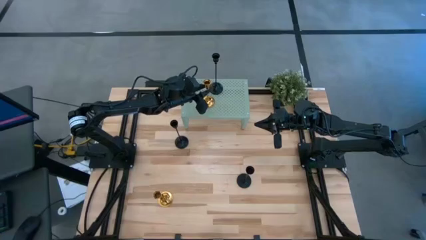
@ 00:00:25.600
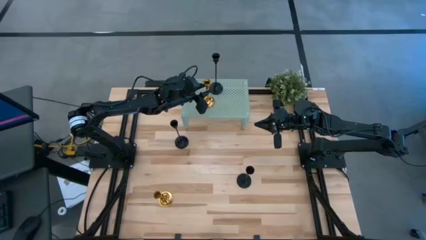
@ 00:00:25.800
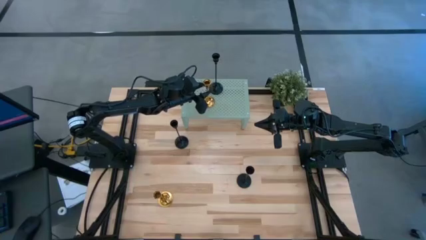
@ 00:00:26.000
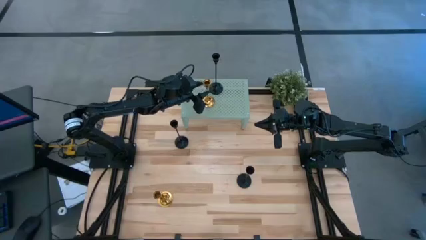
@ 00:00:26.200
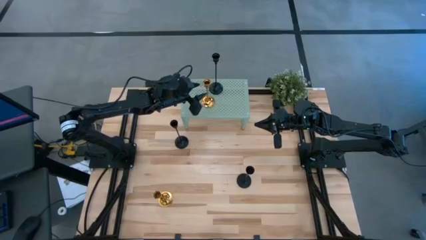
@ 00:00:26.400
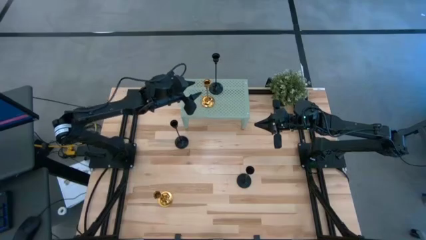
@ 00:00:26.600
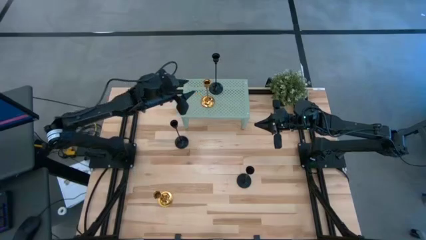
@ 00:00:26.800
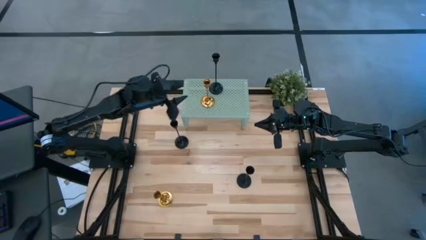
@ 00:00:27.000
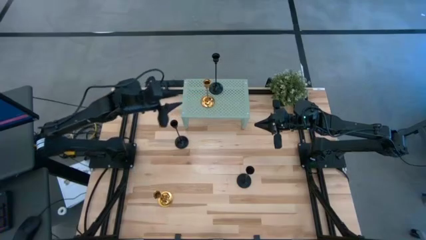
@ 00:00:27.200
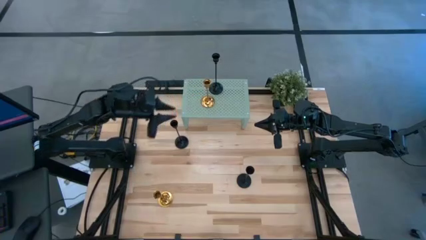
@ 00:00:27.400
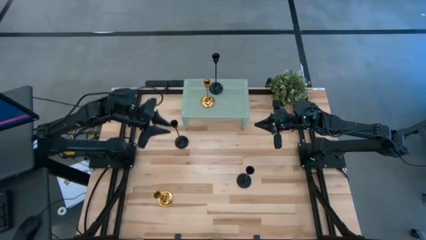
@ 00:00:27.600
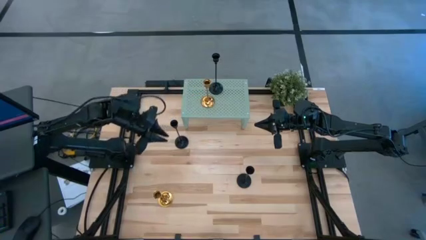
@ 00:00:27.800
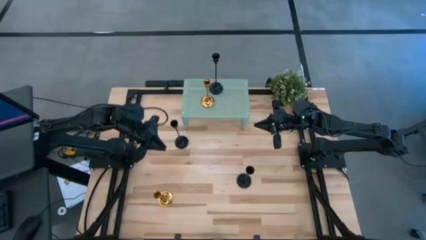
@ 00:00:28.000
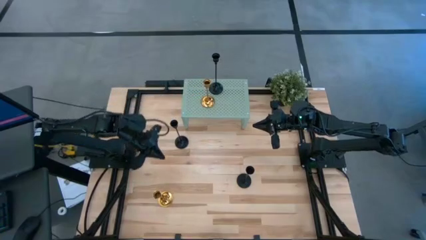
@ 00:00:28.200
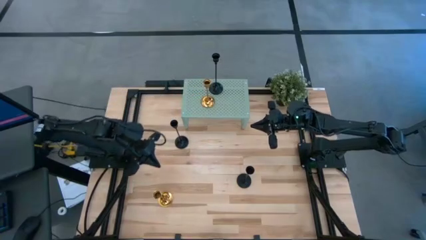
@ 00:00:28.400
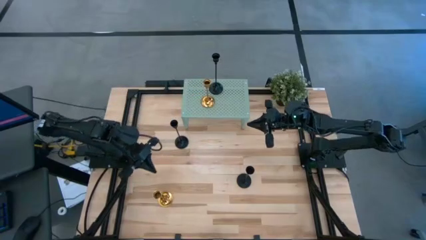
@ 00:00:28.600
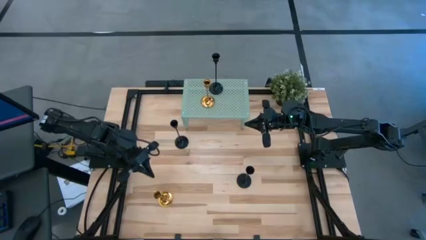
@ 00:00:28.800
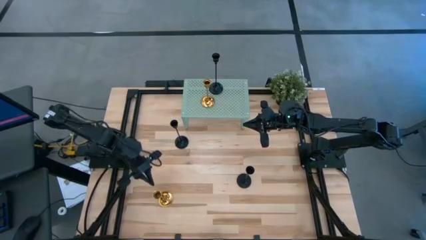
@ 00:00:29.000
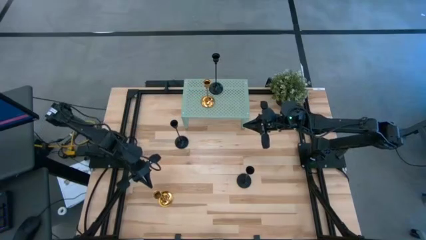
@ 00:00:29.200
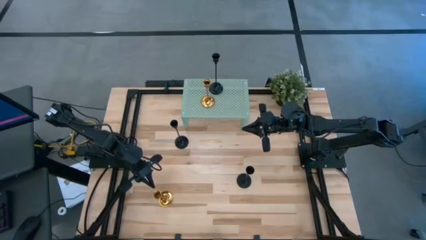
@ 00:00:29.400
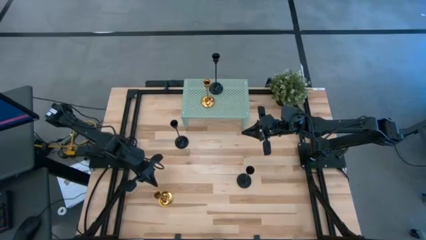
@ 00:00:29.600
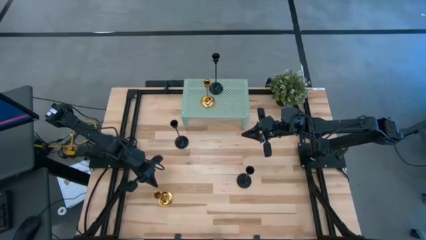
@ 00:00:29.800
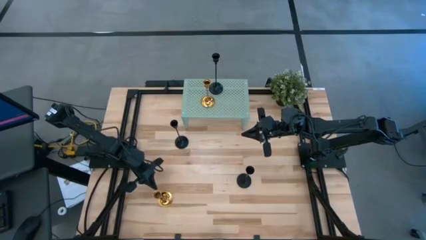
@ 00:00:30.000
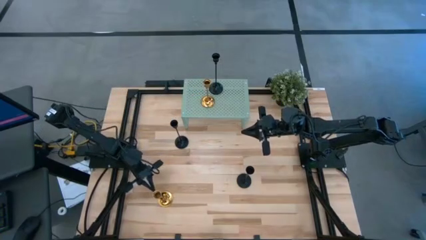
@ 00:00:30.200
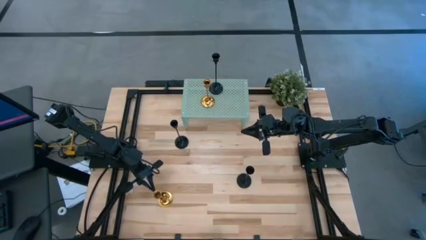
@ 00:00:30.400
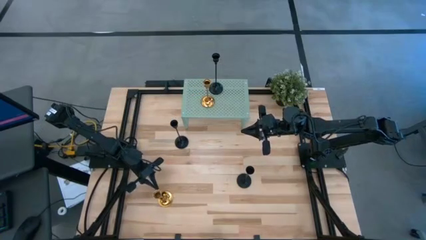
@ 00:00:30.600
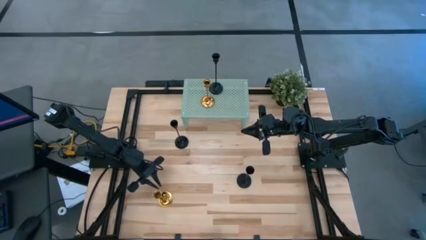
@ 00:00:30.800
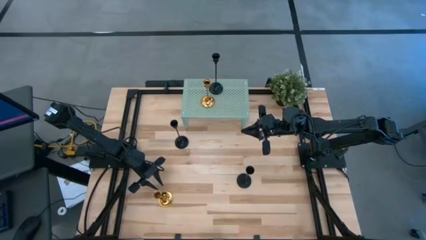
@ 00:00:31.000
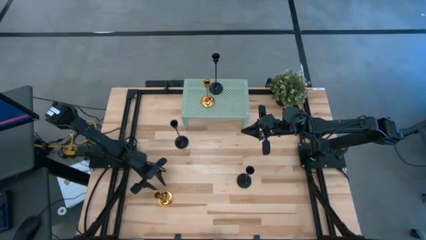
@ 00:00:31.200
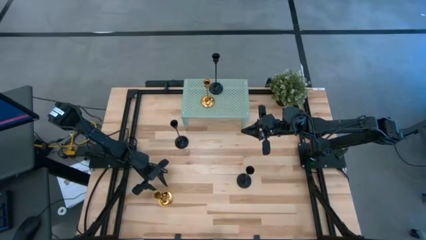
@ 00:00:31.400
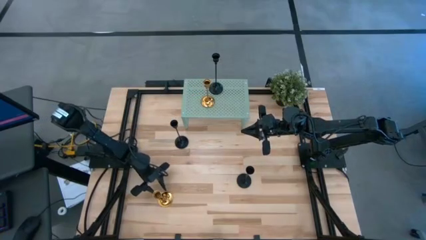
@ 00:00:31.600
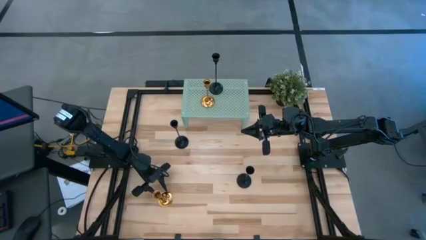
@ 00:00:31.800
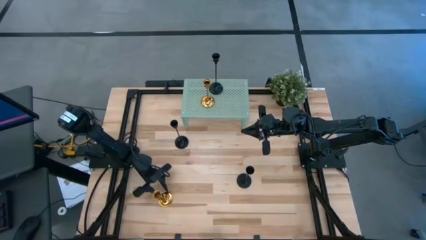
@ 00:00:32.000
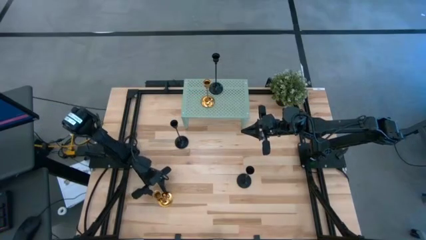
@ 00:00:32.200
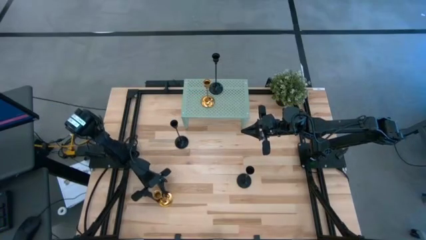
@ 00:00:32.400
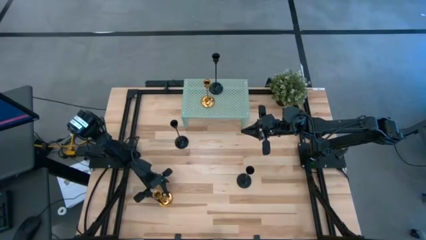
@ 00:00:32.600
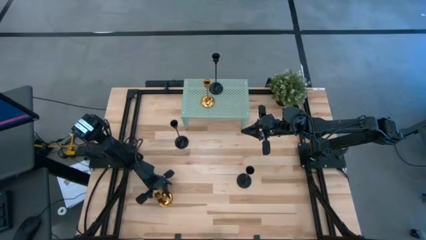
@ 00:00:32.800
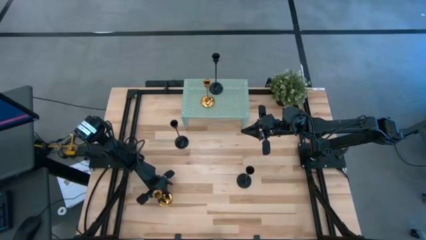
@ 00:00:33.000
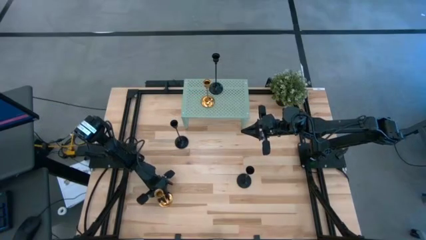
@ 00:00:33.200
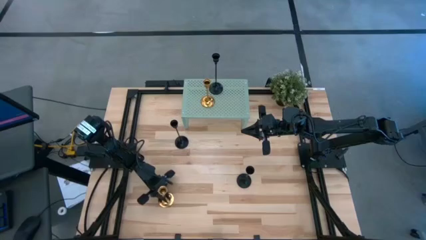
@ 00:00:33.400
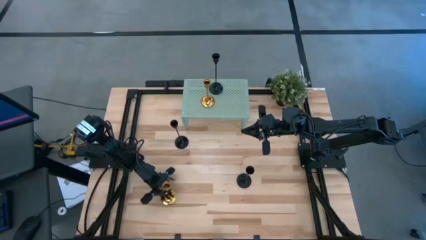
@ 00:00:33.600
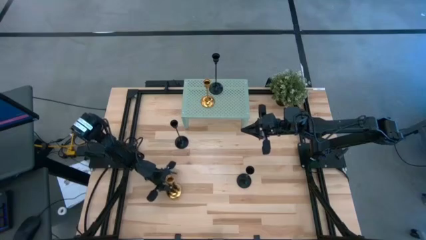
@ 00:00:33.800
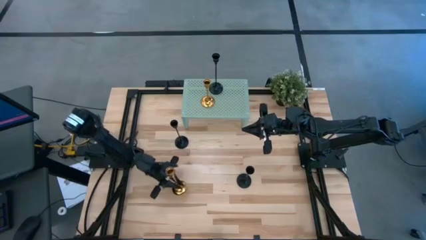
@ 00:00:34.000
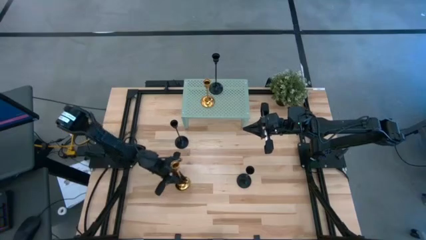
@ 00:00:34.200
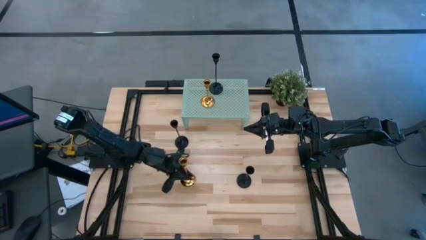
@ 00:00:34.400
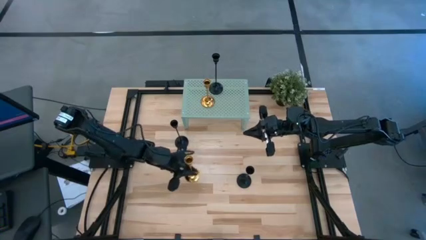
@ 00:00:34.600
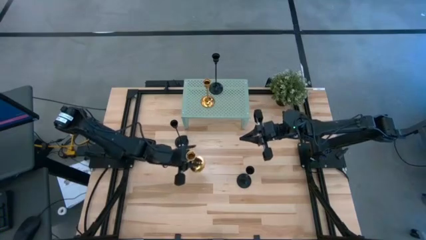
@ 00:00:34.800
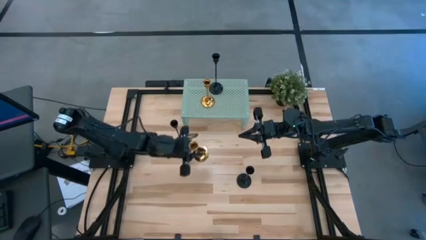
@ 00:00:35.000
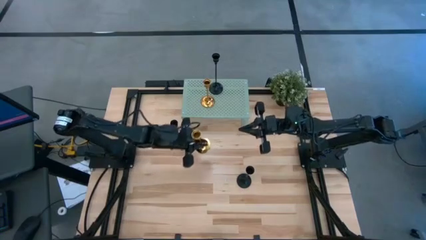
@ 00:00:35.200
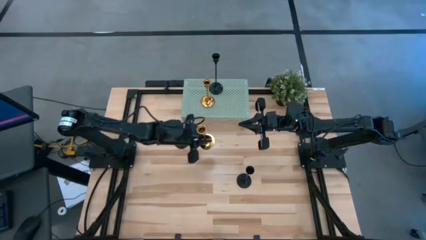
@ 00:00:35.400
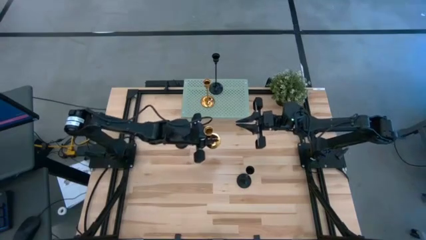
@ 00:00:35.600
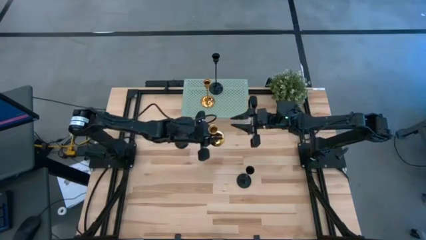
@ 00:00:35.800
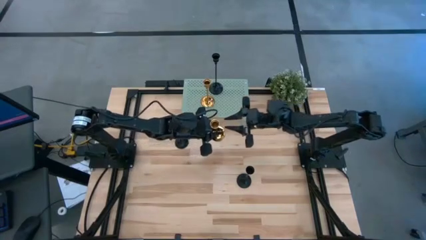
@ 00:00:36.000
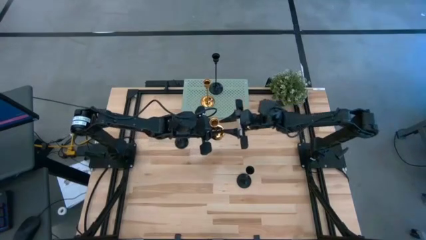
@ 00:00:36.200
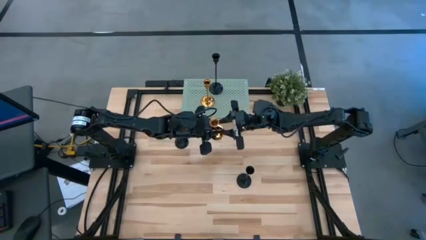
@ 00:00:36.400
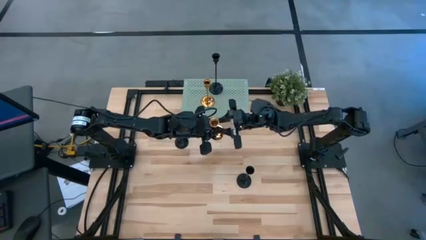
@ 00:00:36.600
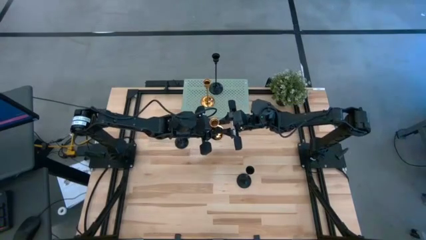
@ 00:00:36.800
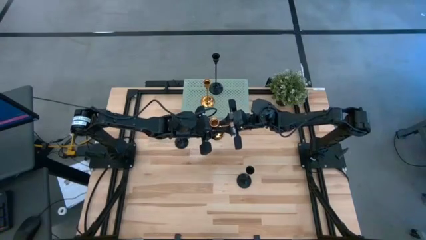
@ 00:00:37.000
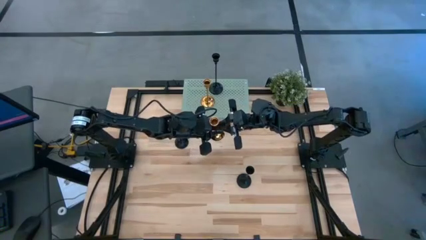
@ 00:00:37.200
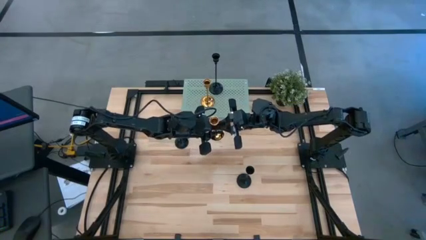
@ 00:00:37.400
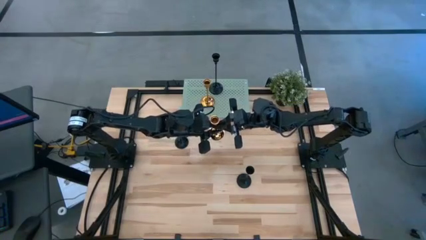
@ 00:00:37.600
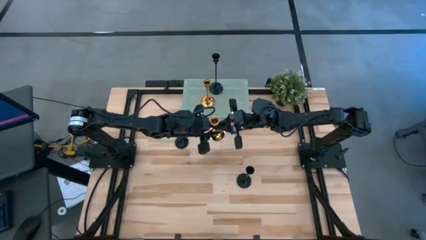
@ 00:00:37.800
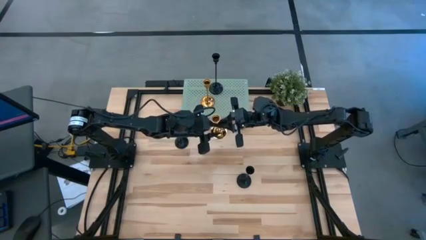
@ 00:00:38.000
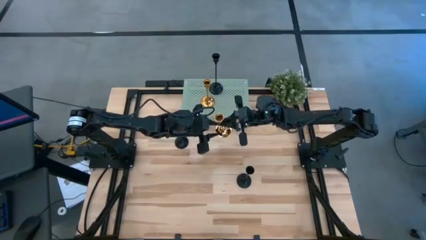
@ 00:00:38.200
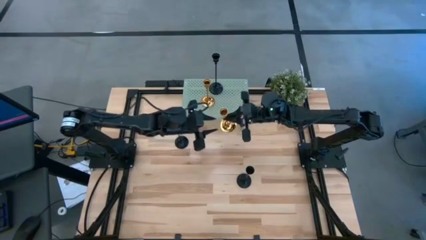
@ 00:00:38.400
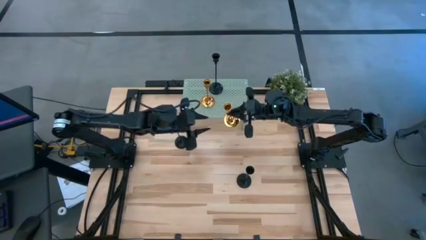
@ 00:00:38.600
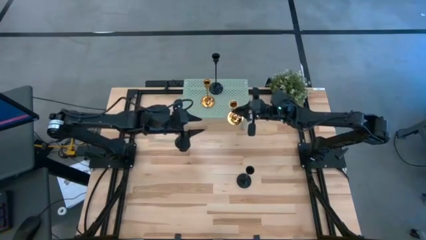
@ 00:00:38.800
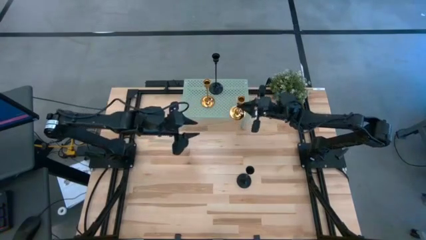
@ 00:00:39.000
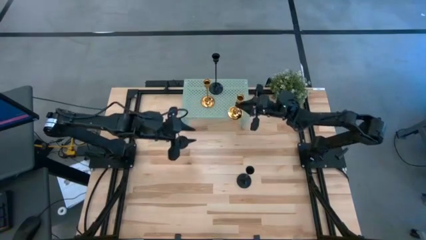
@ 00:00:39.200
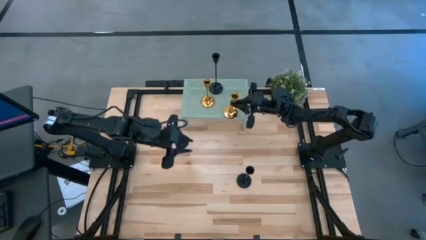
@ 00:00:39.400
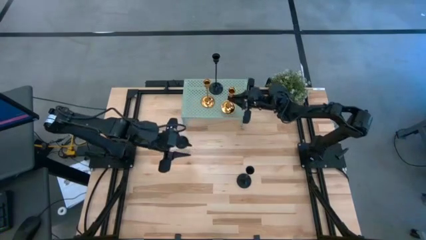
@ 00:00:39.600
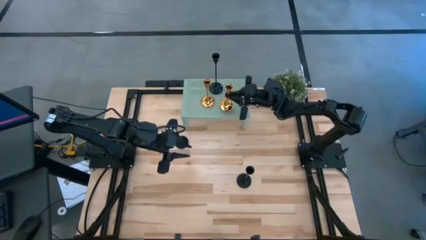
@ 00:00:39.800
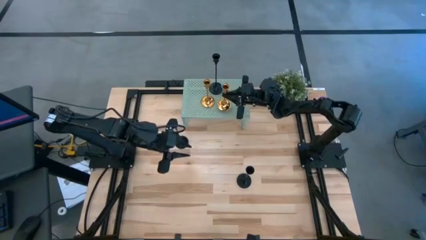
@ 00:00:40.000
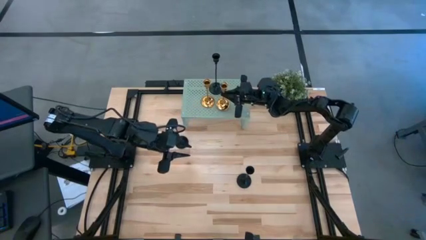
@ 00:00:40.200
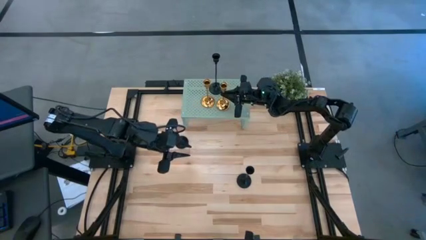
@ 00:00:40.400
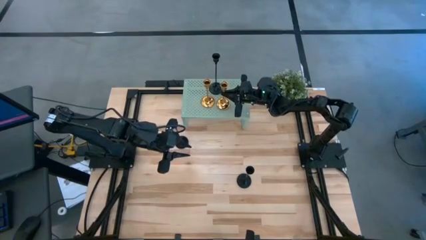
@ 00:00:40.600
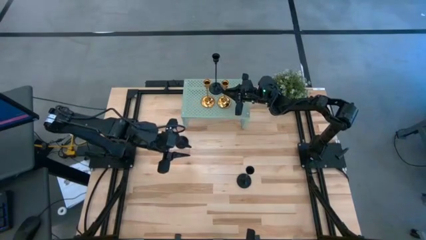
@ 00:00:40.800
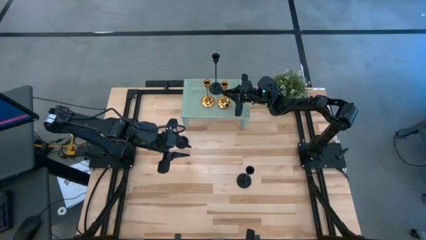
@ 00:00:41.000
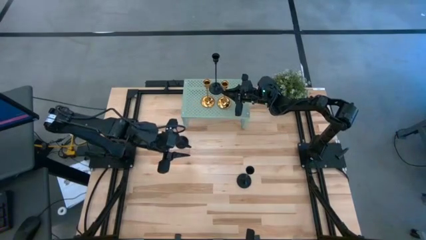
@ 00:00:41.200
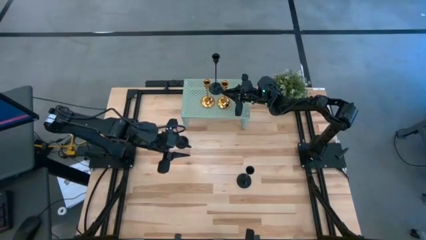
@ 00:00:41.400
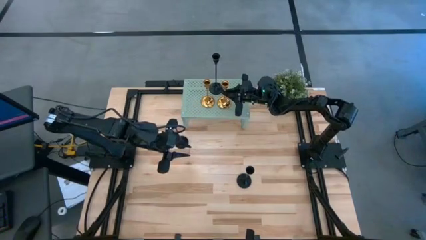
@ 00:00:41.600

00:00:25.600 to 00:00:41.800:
Task: Pick & Place candle stick holders
Put the gold candle holder on the shelf
